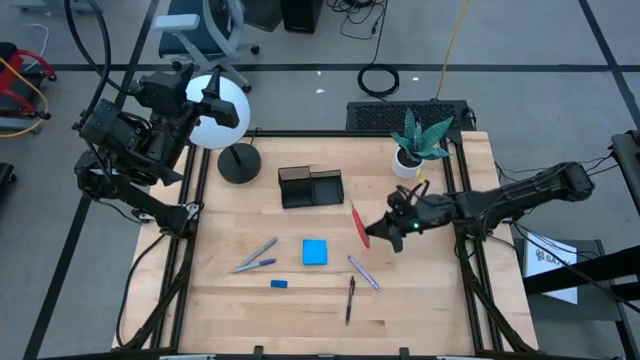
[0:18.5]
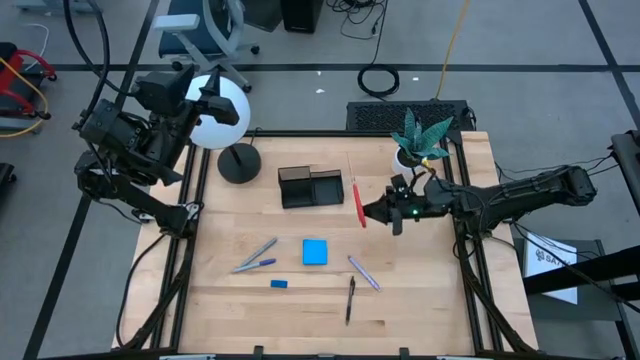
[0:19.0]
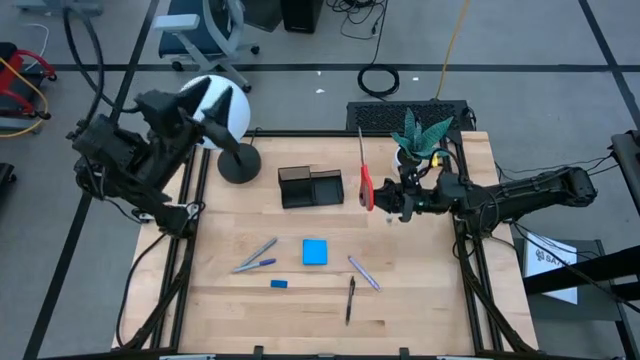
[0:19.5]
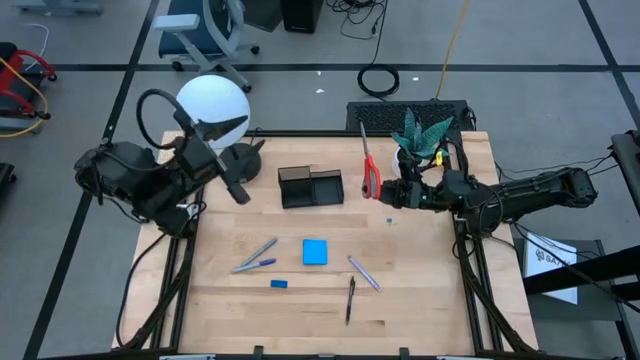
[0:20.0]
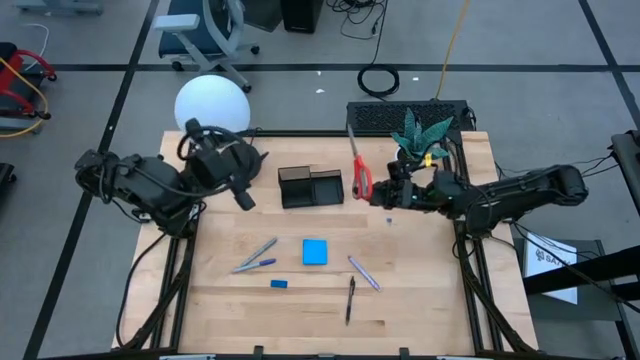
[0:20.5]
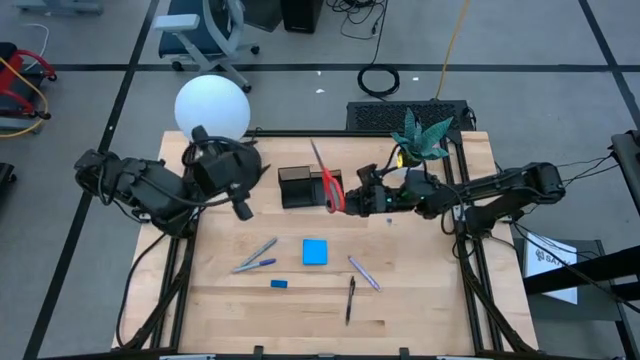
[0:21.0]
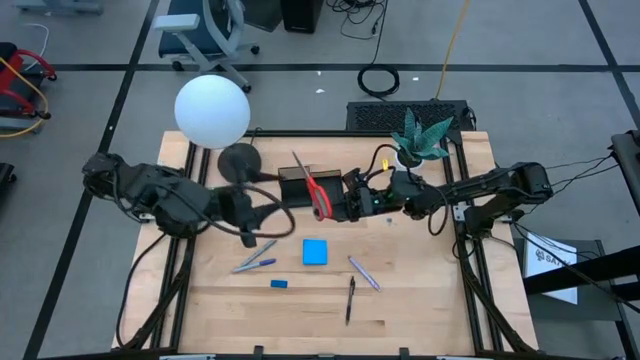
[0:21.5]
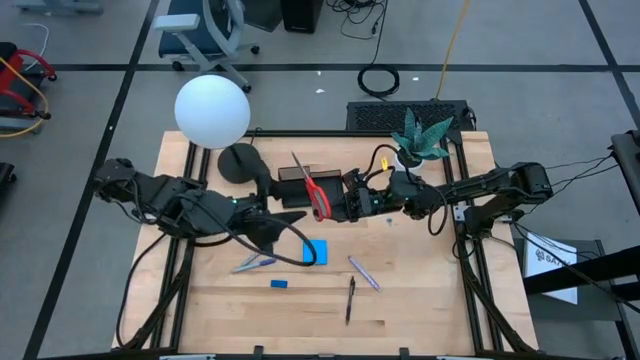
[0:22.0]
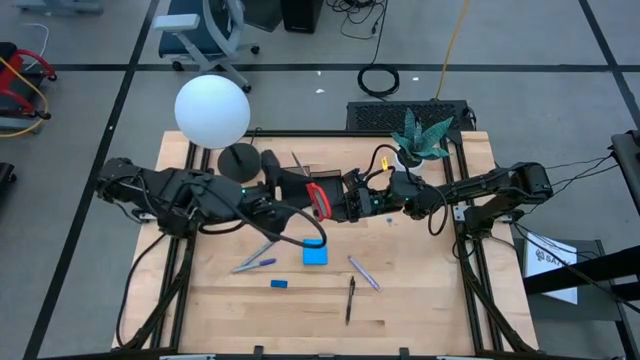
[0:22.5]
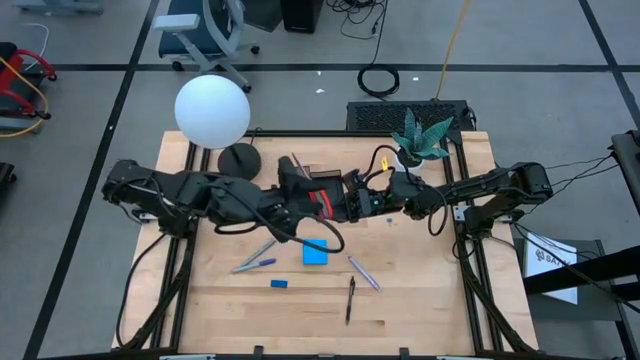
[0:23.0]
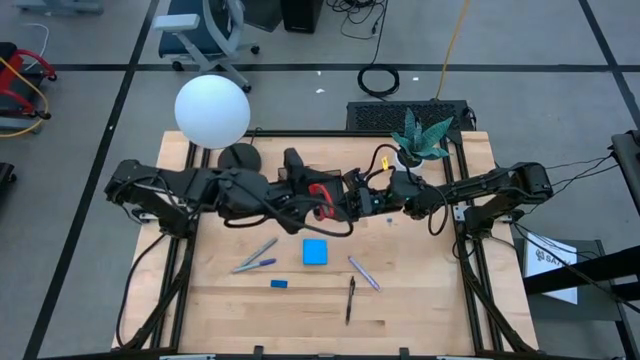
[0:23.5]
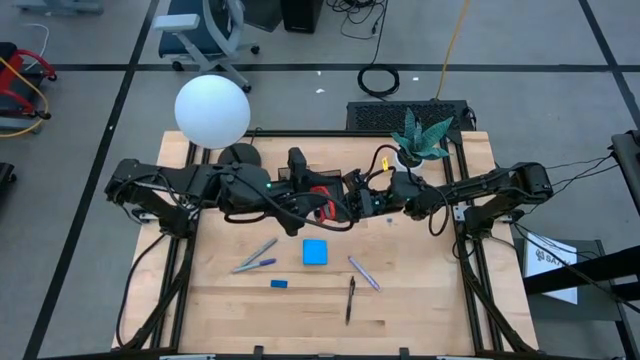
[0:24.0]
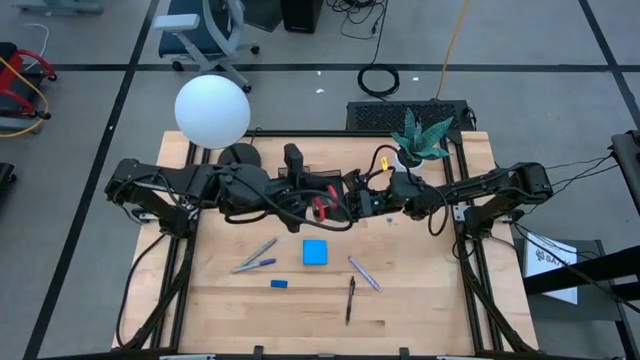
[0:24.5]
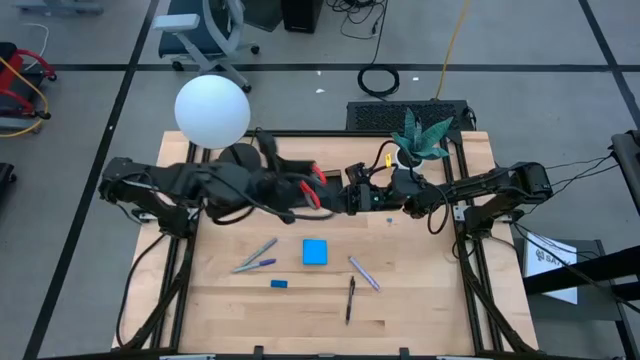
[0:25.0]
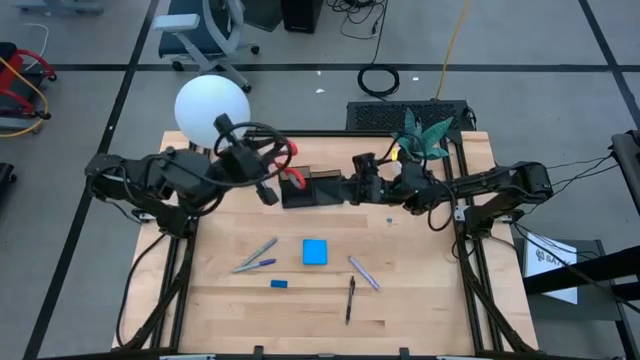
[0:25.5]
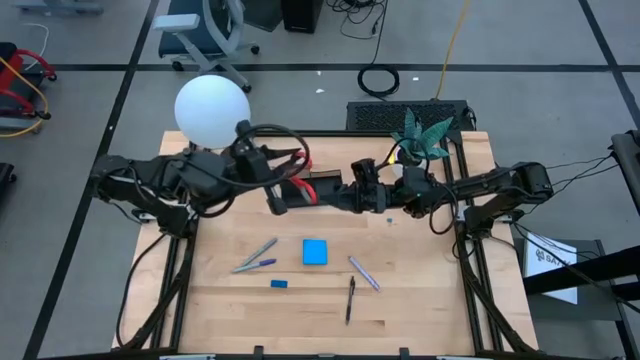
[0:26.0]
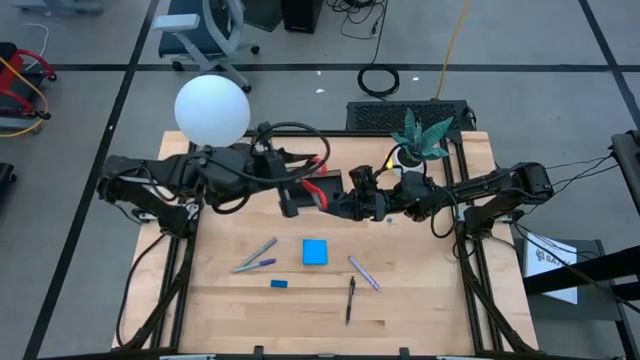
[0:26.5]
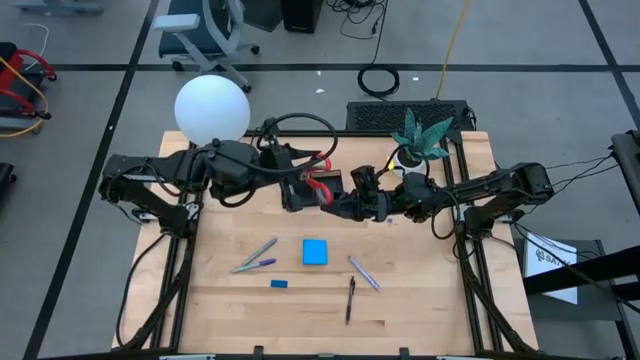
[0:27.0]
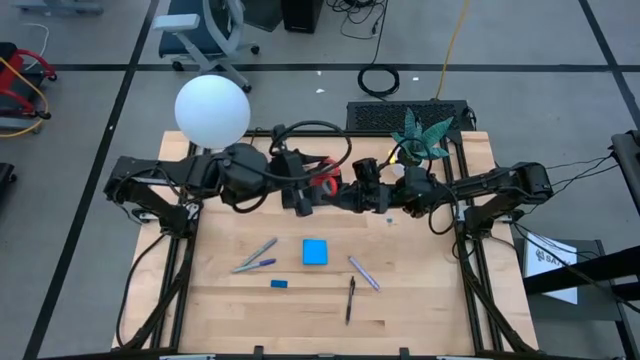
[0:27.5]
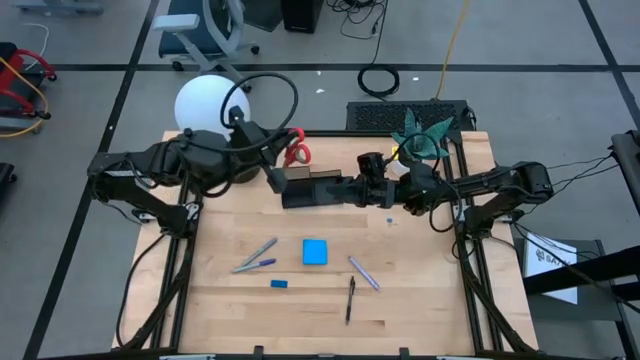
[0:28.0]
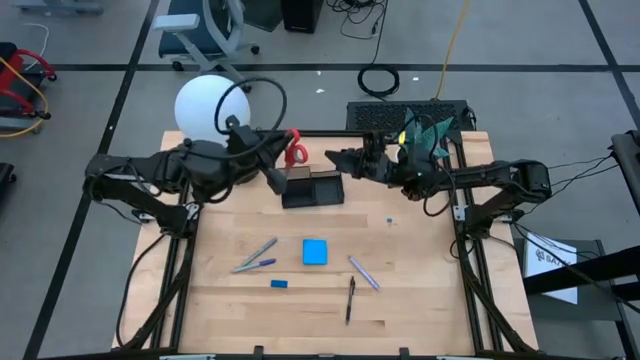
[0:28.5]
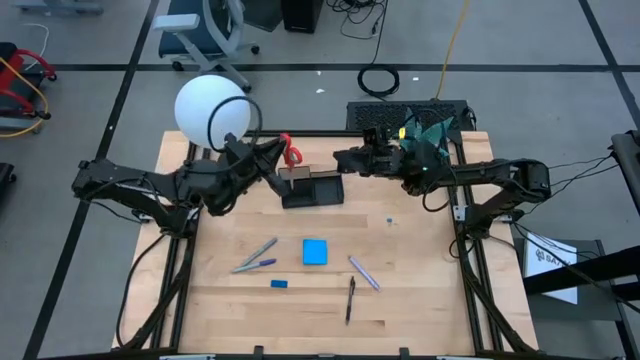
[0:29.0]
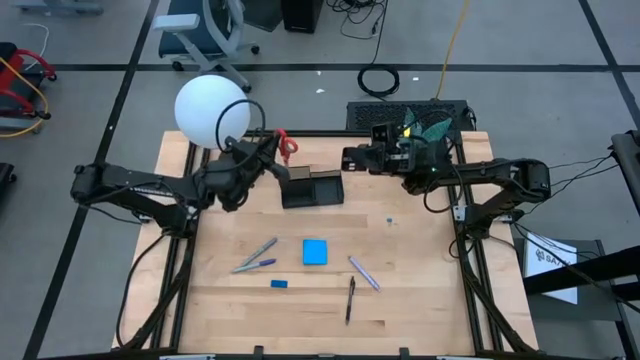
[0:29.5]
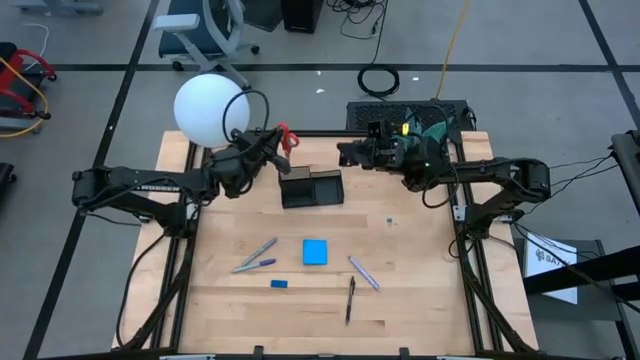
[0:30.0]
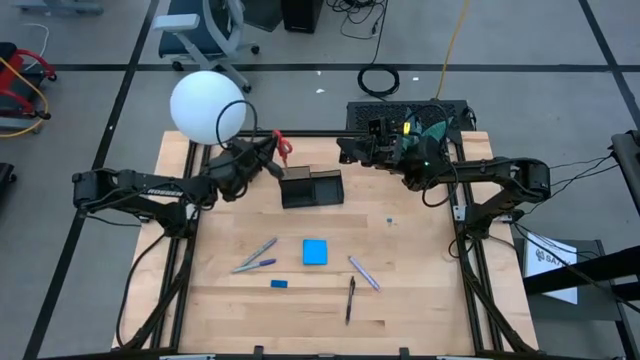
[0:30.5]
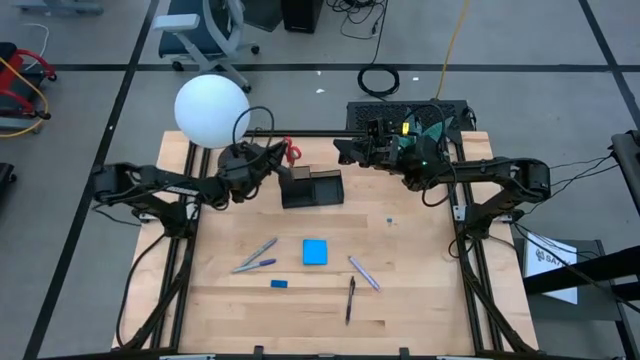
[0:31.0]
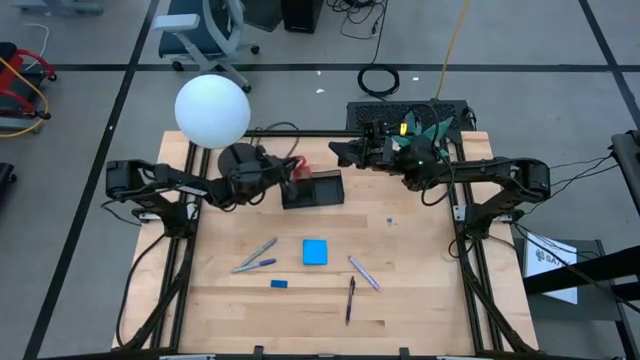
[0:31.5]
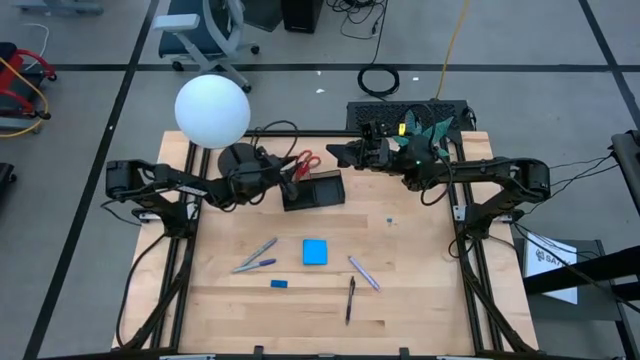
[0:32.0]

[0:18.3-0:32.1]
Task: Pick and place office supplies into organizer
Put the orange scissors into the desk organizer

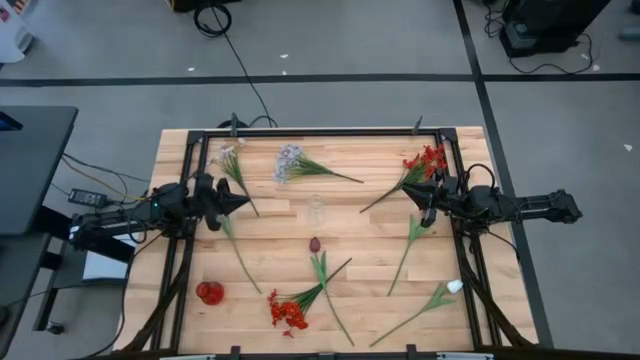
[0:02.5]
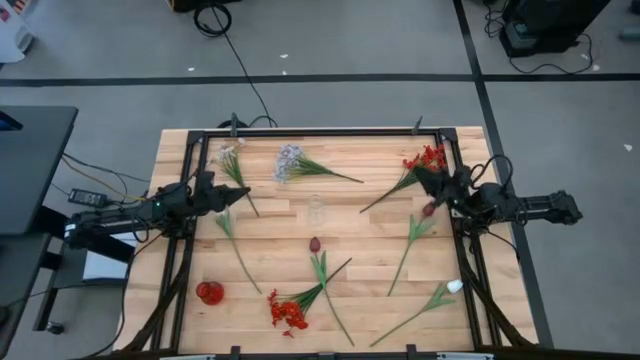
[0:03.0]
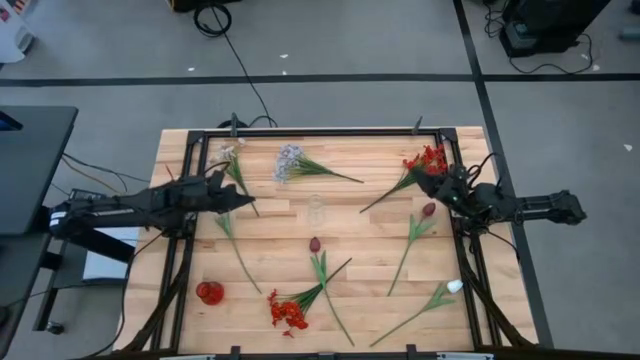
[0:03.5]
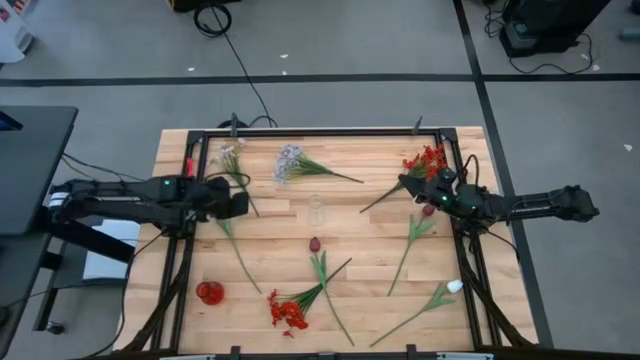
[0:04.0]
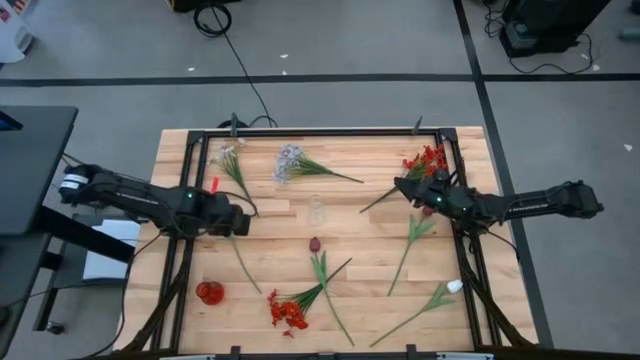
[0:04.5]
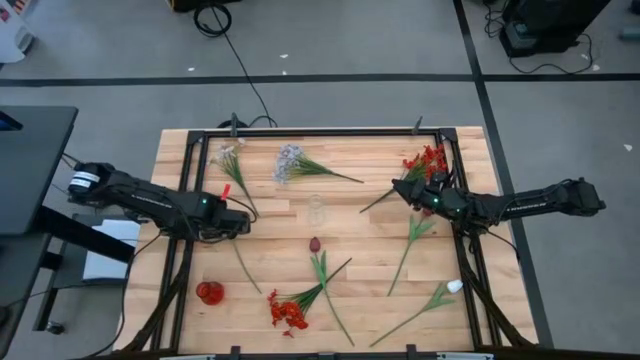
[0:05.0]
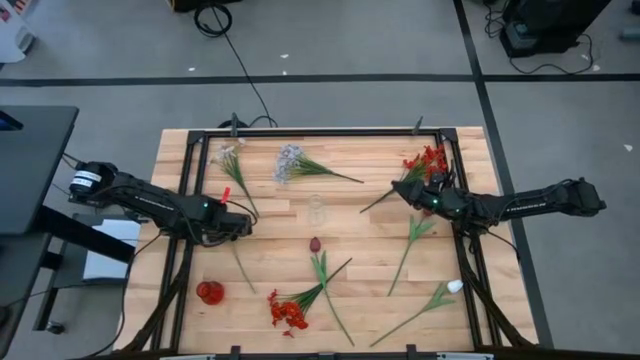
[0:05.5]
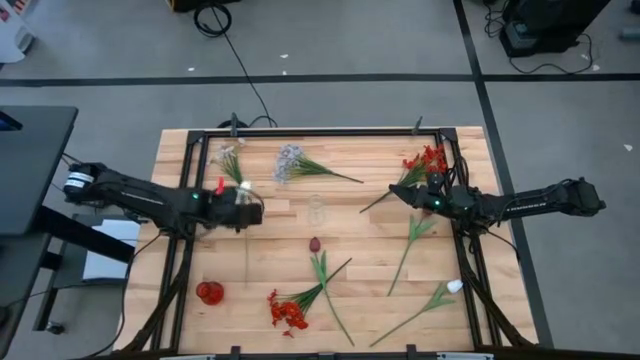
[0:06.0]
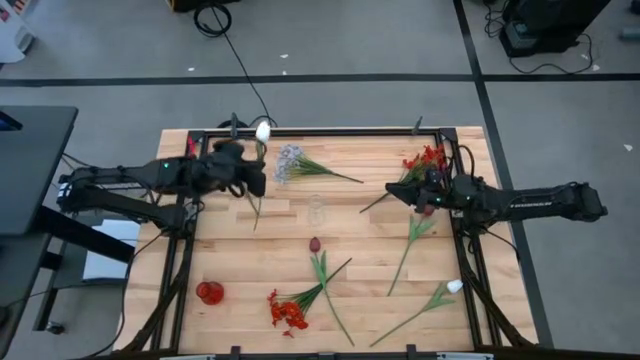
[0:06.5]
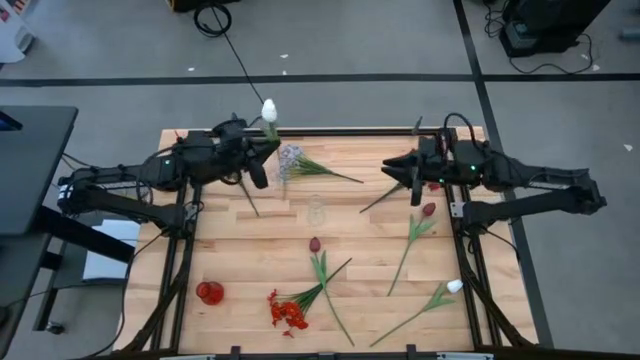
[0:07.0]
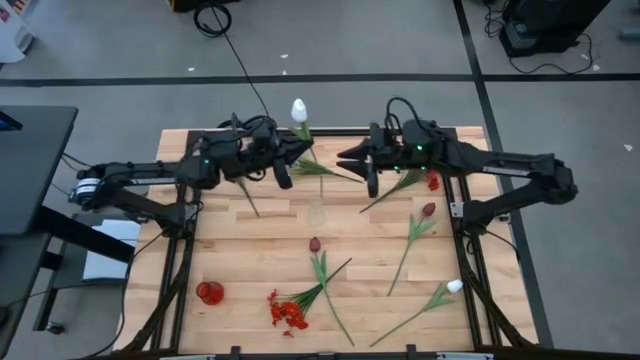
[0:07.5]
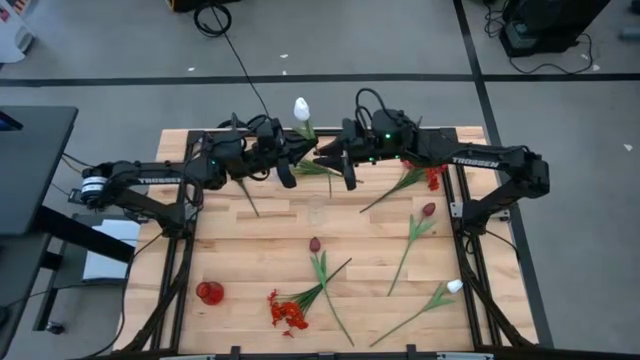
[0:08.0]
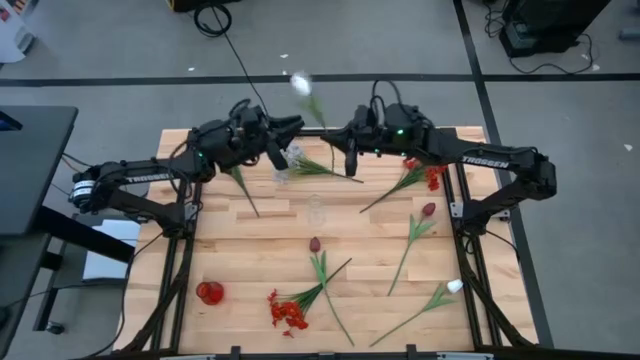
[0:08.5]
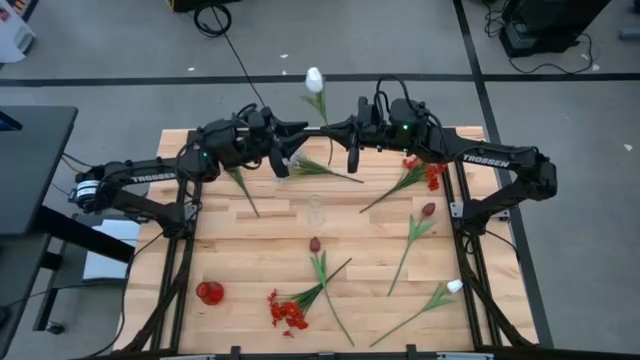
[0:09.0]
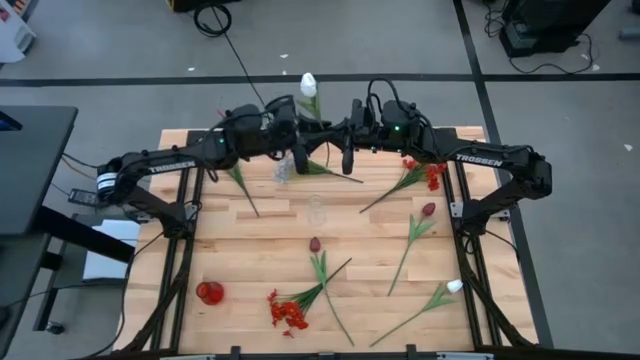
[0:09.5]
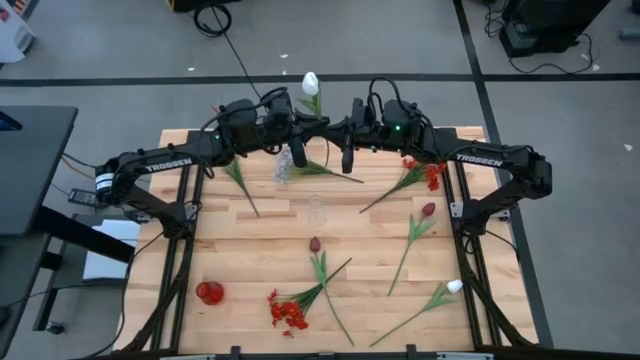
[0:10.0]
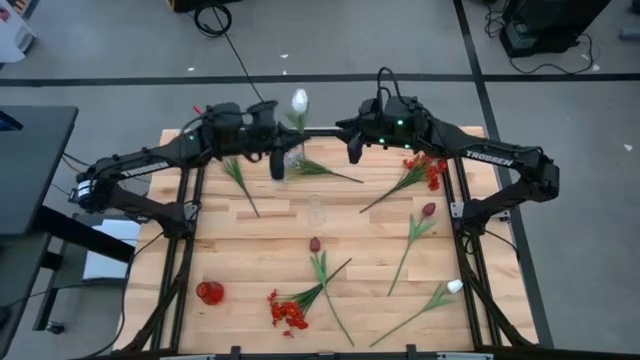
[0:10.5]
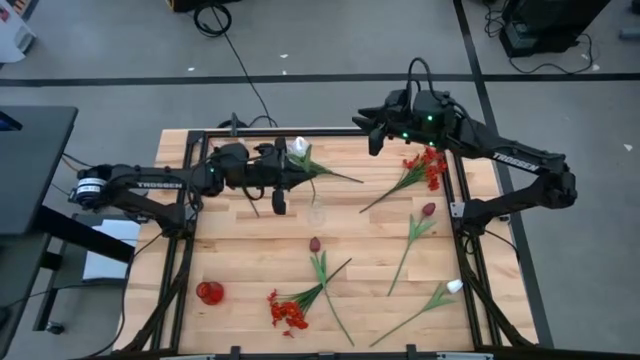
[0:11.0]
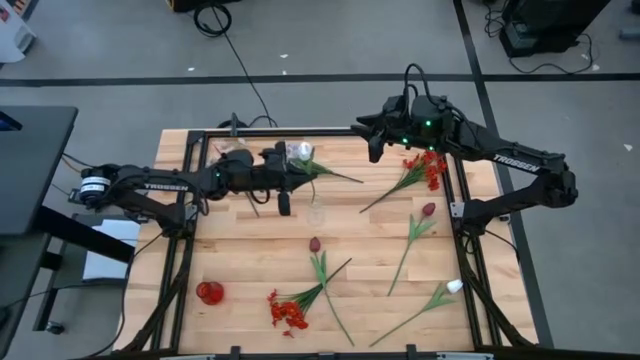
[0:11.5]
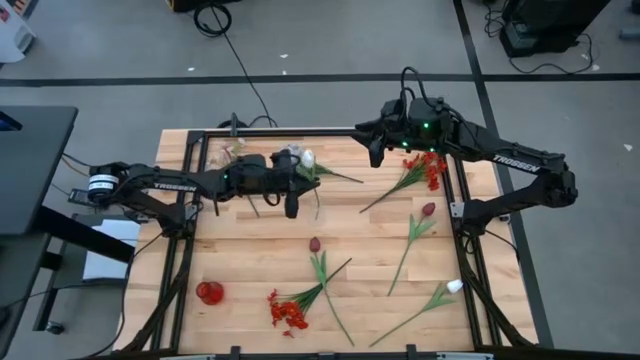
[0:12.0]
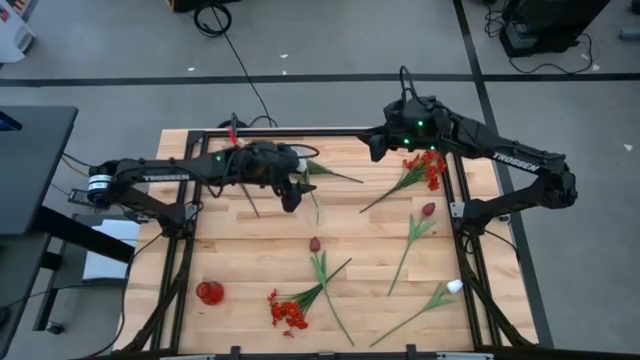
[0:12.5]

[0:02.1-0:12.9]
Task: Sort flowers into vase by color
Put the left white flower into the transparent vase
